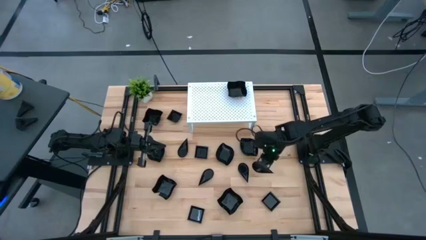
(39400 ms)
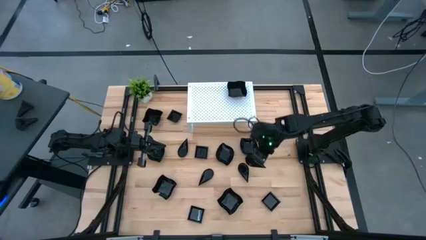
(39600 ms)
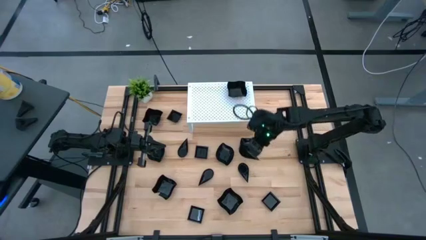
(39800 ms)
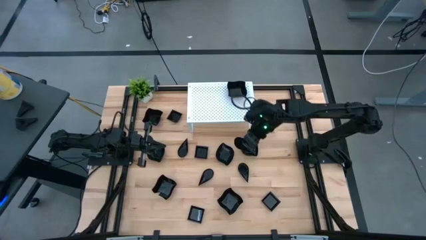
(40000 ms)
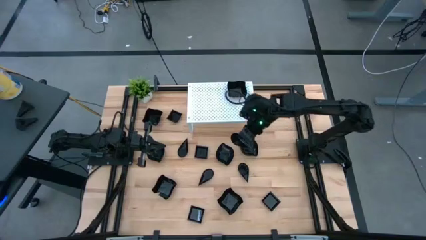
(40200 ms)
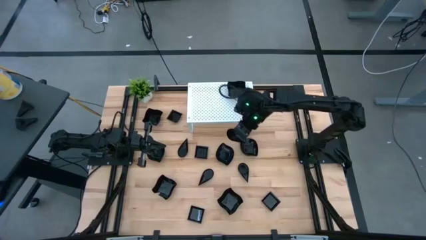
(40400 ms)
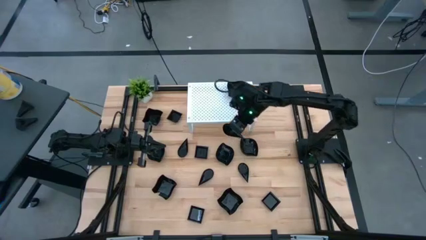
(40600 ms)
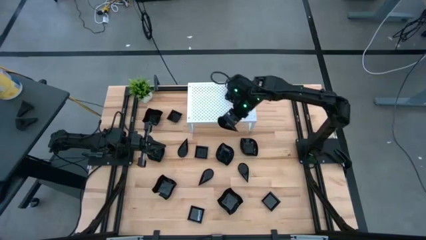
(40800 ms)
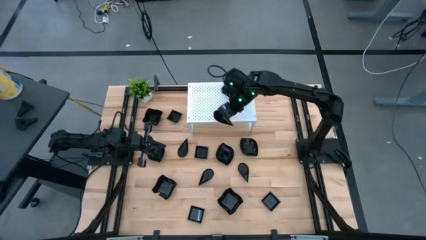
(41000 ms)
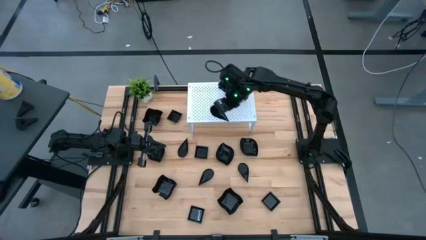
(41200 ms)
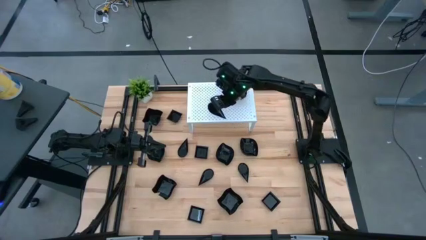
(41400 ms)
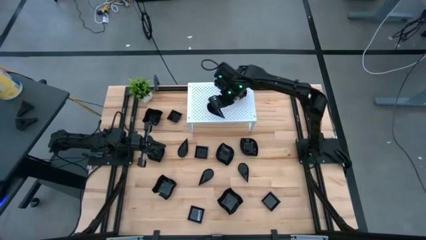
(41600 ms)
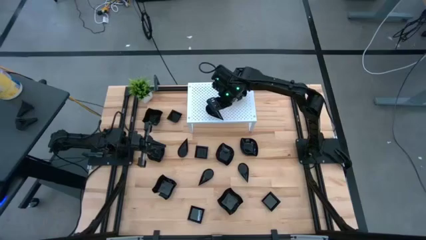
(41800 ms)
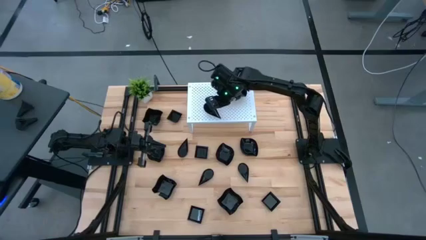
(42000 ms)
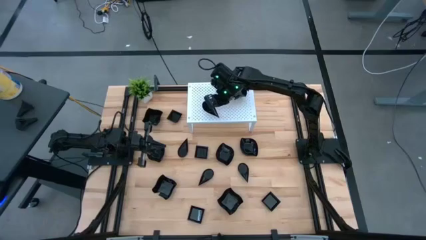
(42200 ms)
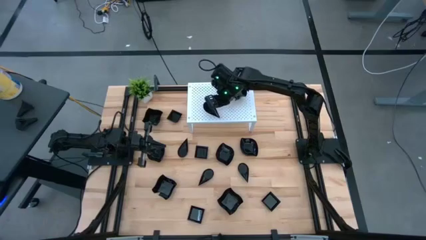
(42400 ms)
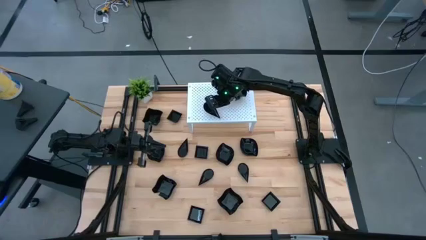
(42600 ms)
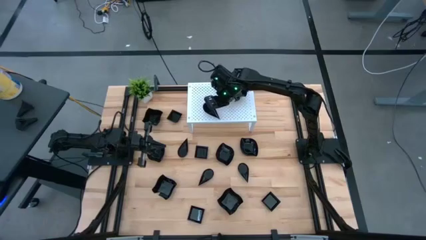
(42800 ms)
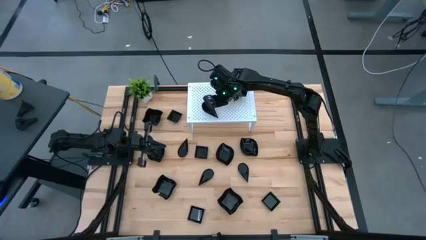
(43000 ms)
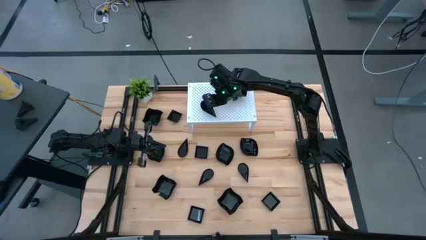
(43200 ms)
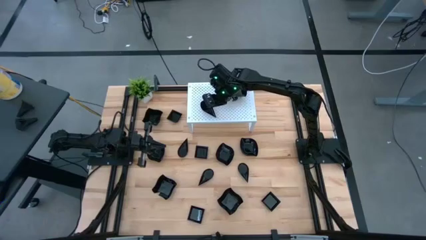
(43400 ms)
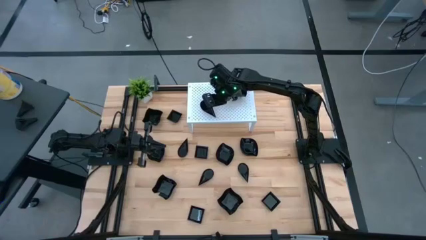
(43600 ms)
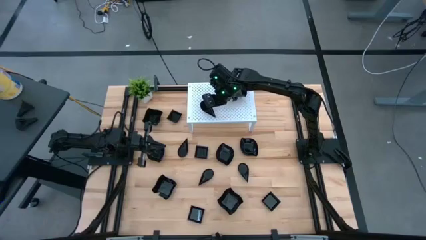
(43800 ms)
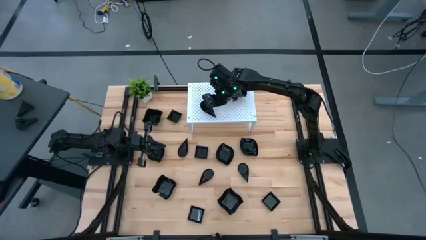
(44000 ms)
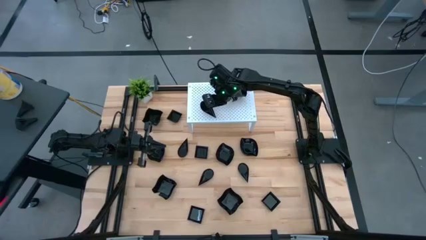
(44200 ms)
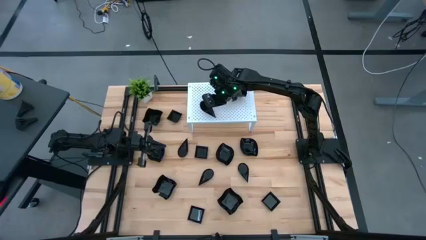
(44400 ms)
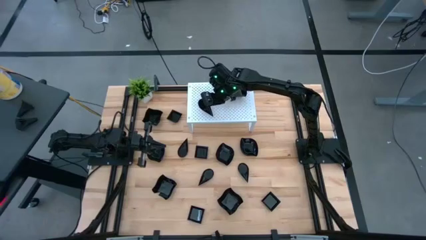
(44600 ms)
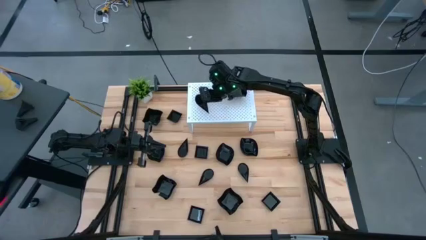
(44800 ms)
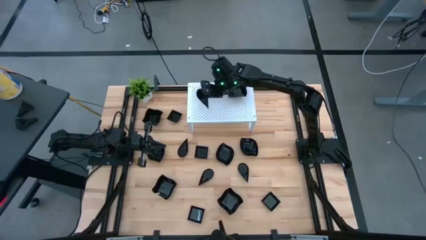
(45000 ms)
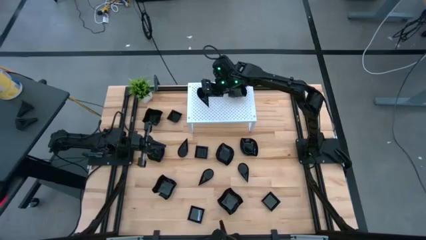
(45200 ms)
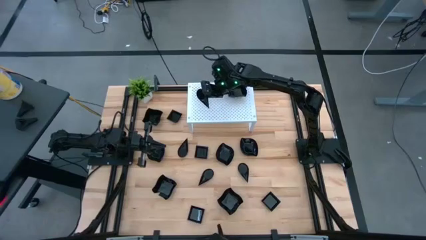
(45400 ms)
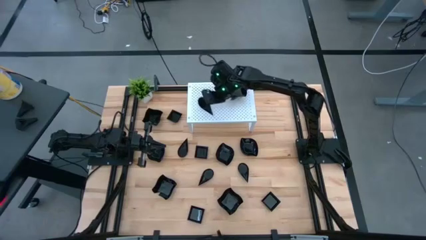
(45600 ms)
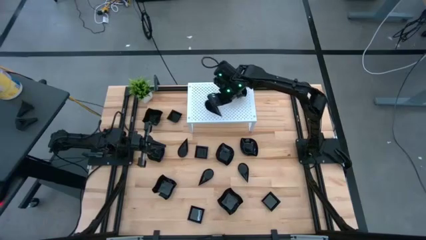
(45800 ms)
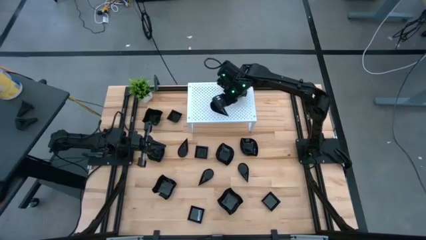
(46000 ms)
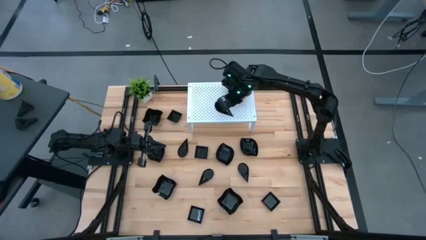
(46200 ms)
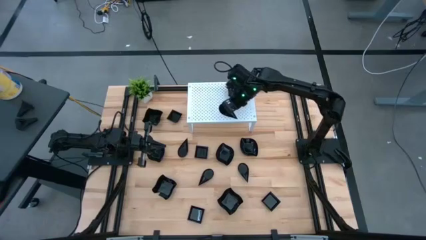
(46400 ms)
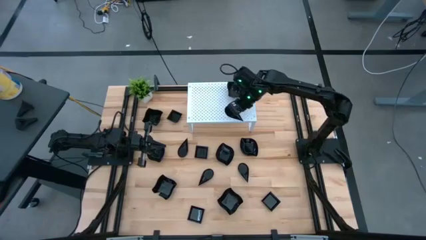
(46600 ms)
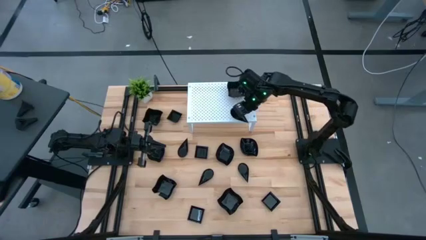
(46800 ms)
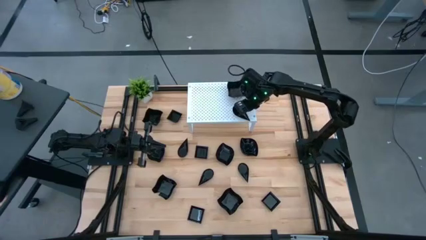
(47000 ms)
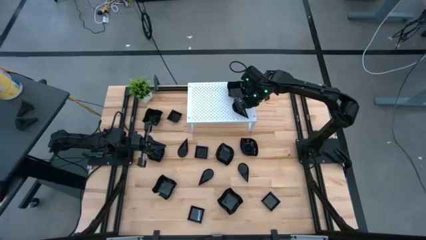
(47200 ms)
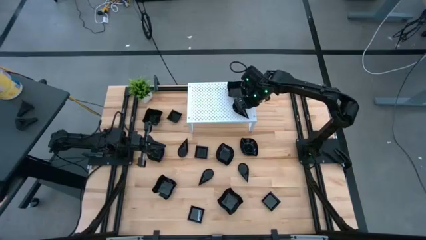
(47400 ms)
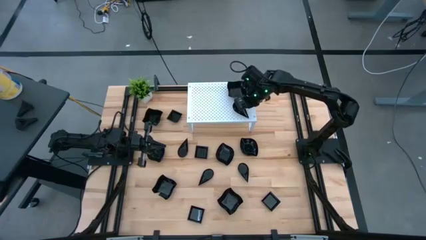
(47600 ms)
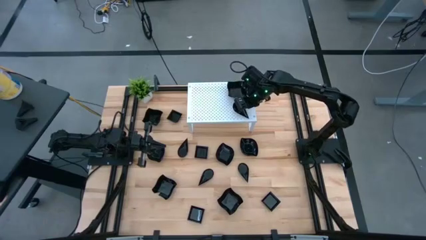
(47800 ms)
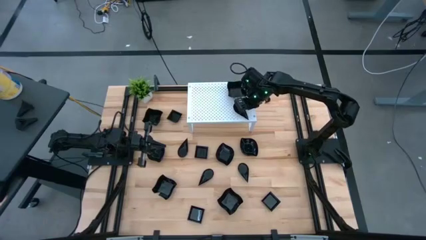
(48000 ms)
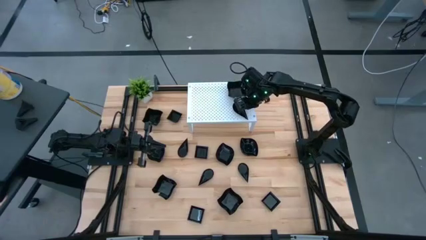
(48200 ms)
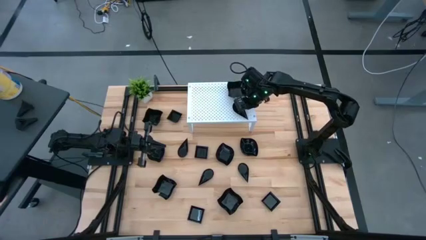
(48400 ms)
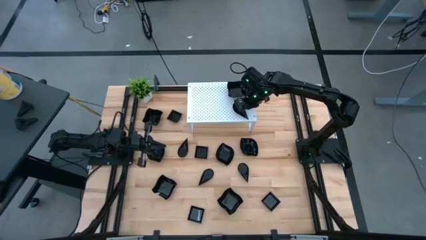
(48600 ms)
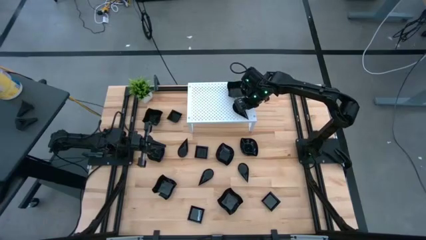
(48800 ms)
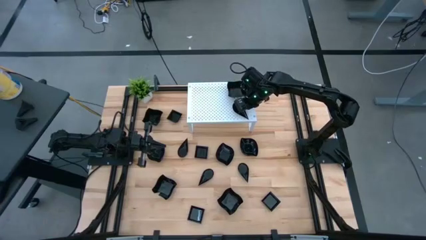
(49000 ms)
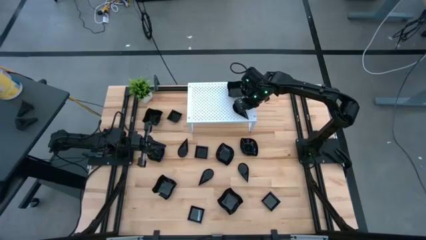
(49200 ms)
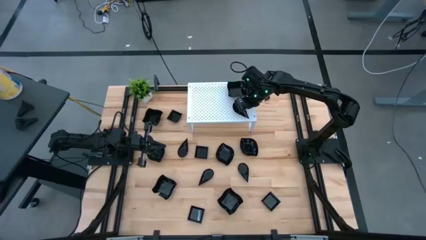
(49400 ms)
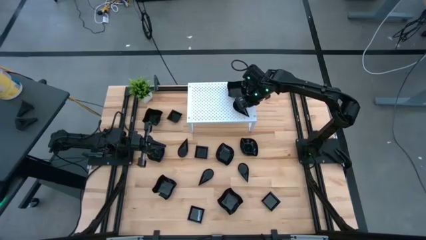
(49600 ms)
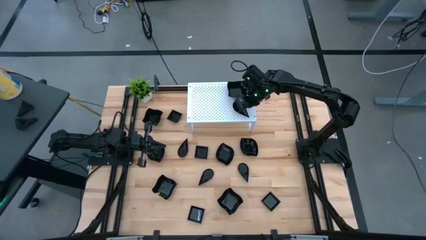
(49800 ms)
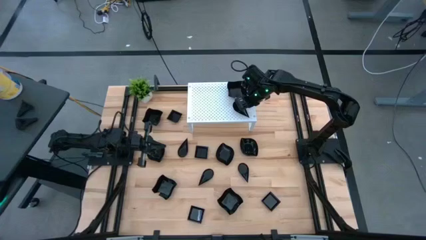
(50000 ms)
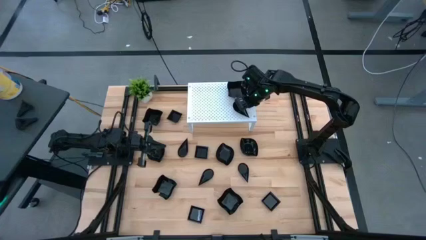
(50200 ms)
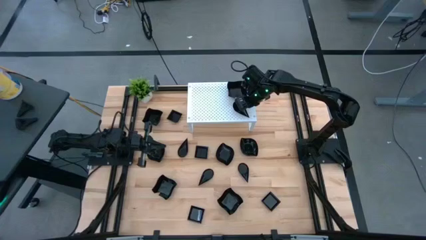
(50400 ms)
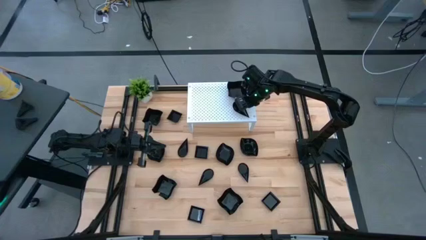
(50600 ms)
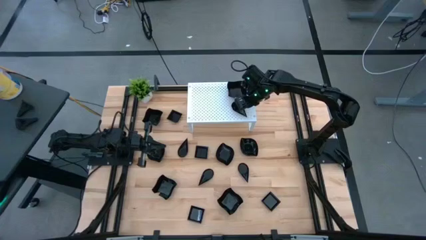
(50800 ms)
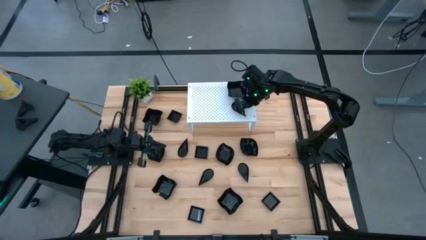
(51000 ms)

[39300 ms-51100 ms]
Task: Pick & Place Mini shaped plates
Put the drop-shaped plate on the shelf
